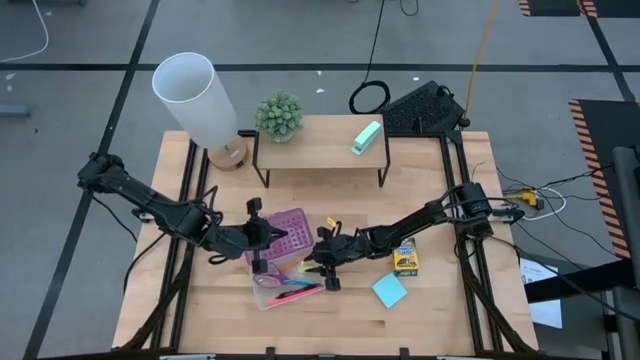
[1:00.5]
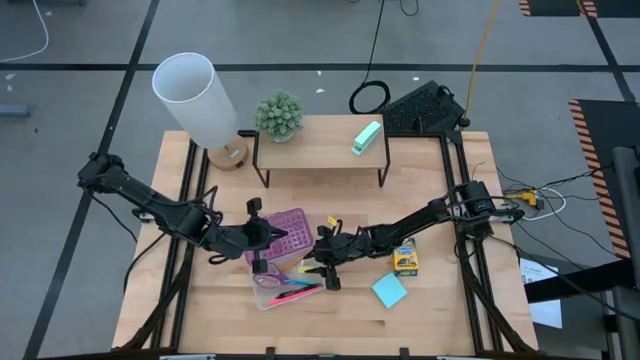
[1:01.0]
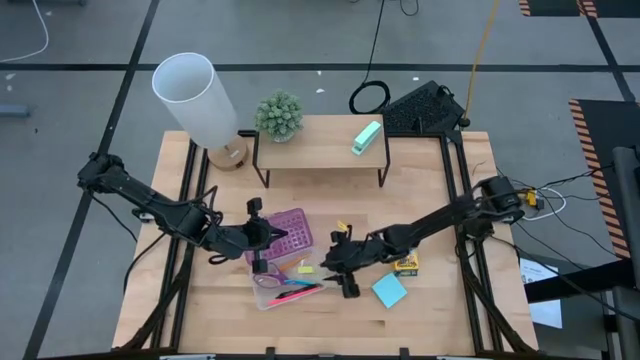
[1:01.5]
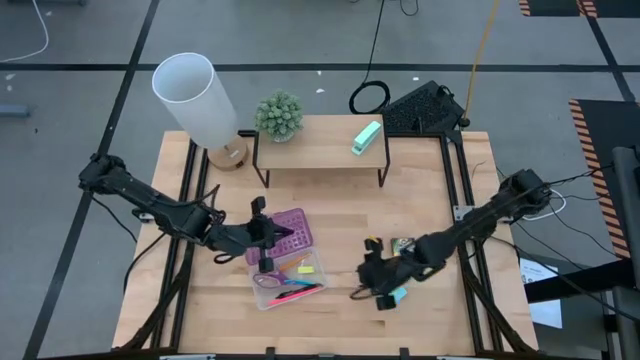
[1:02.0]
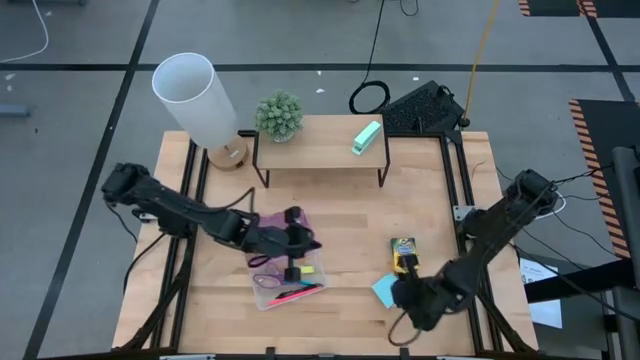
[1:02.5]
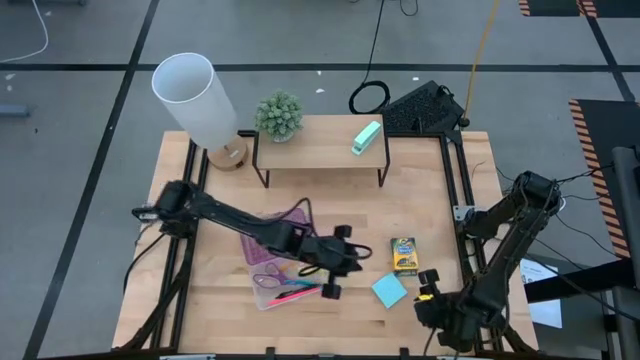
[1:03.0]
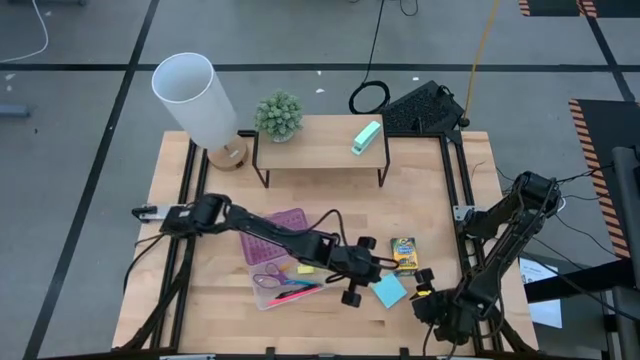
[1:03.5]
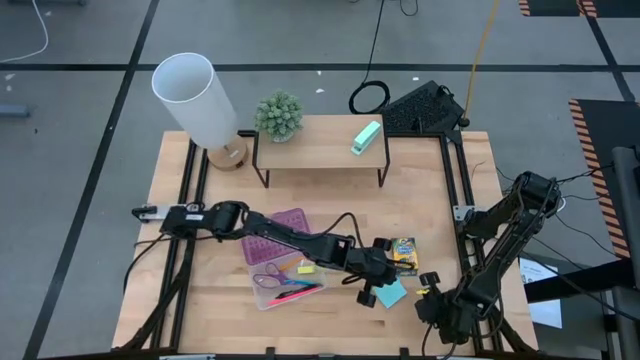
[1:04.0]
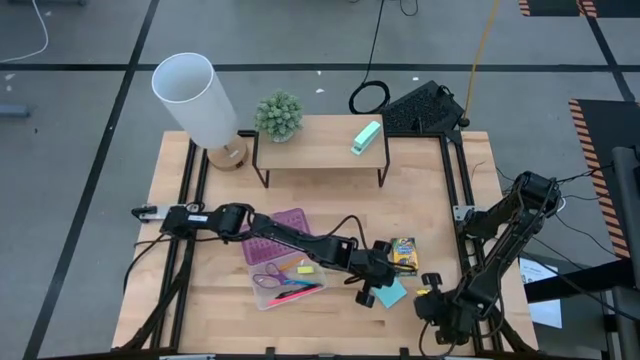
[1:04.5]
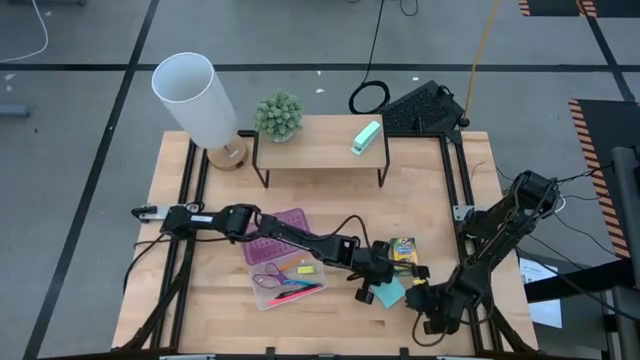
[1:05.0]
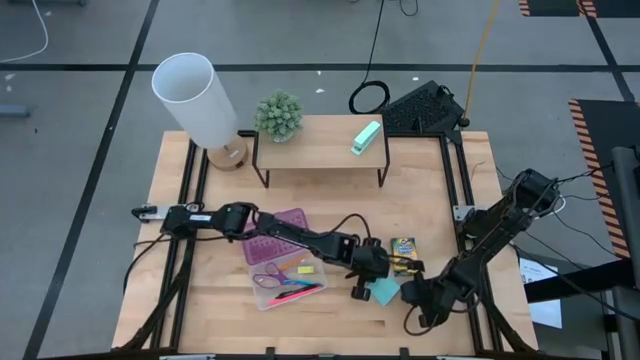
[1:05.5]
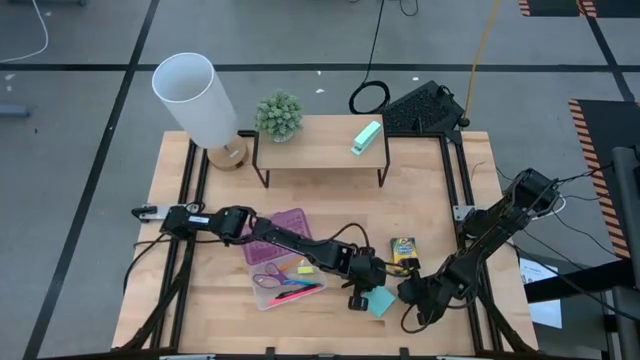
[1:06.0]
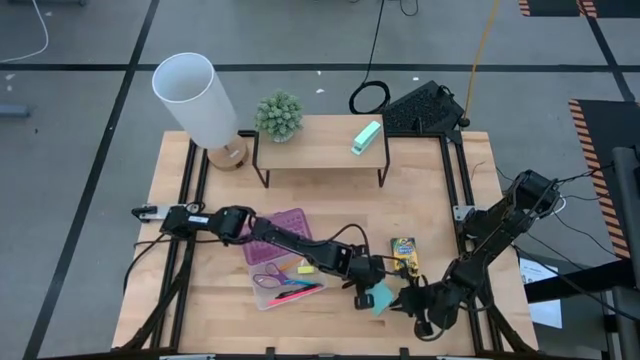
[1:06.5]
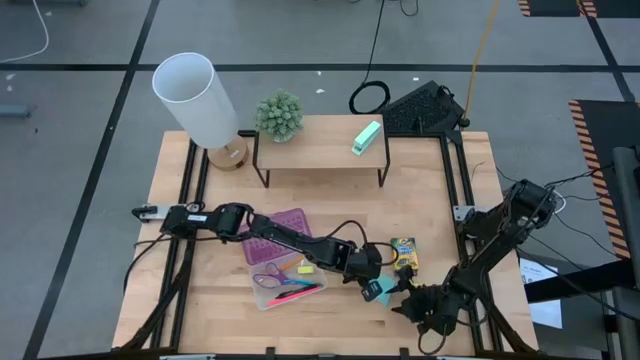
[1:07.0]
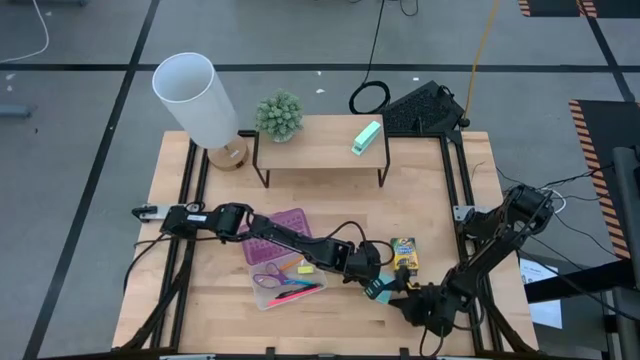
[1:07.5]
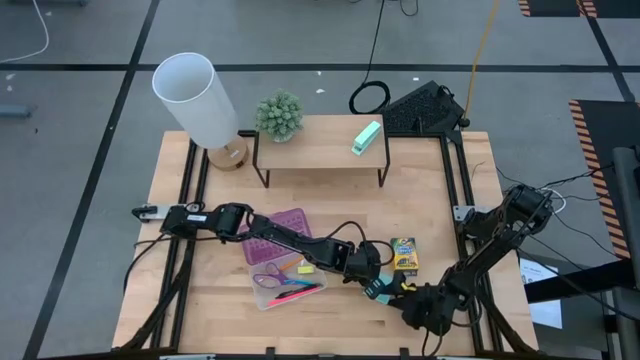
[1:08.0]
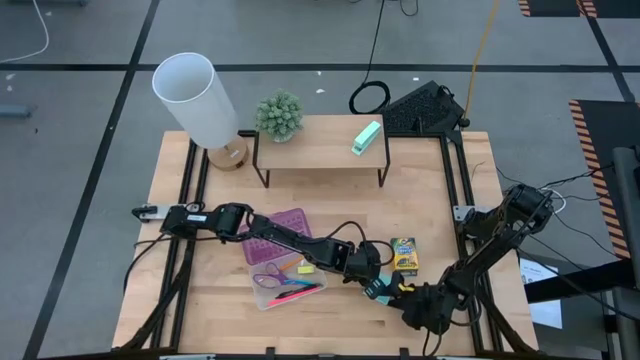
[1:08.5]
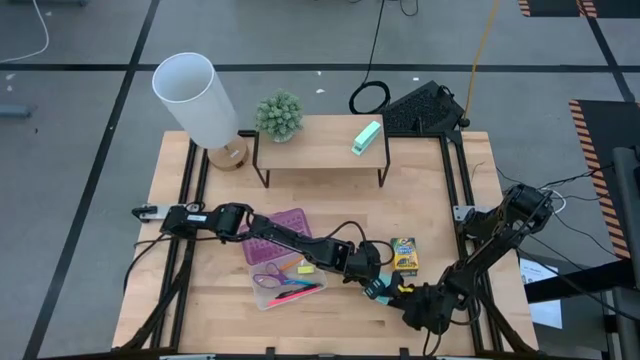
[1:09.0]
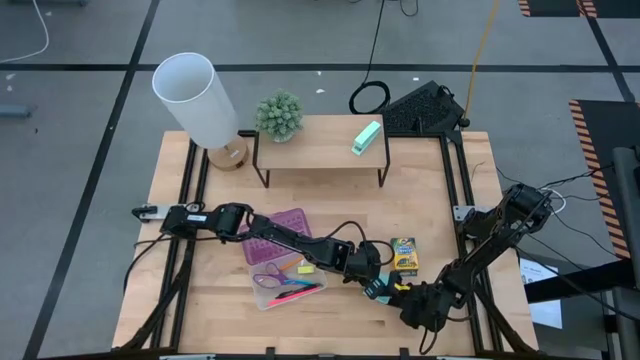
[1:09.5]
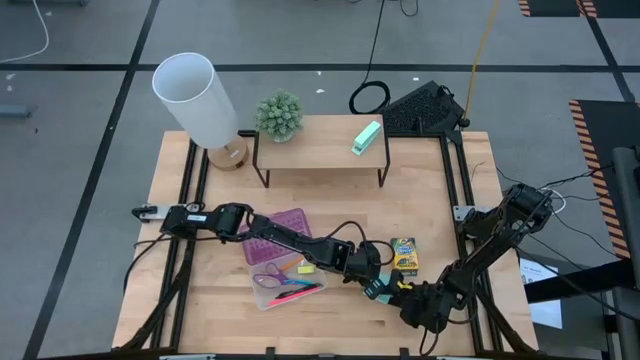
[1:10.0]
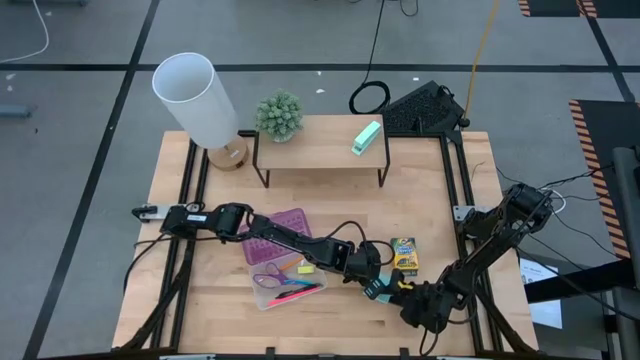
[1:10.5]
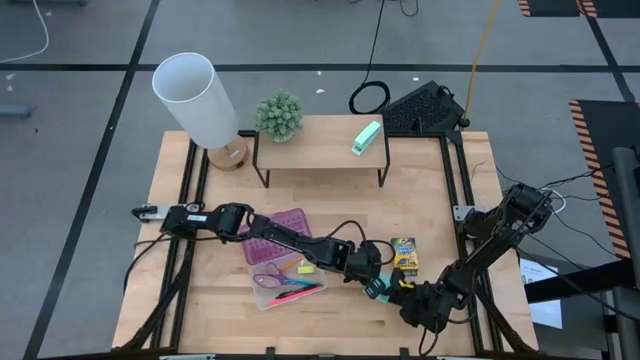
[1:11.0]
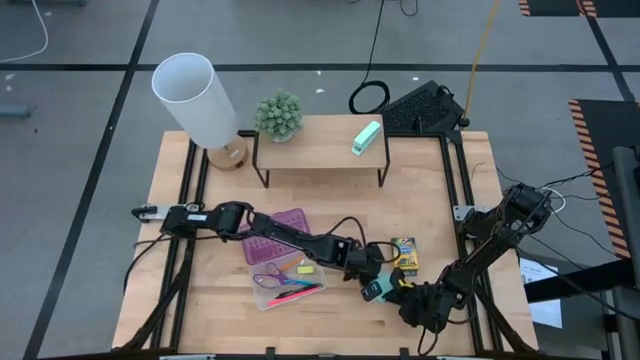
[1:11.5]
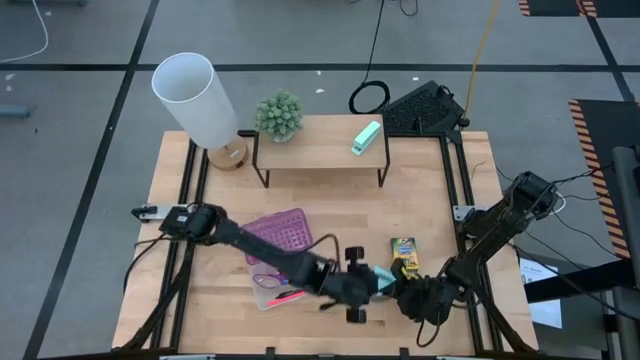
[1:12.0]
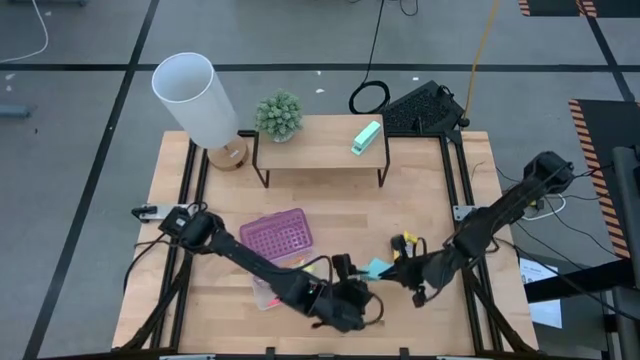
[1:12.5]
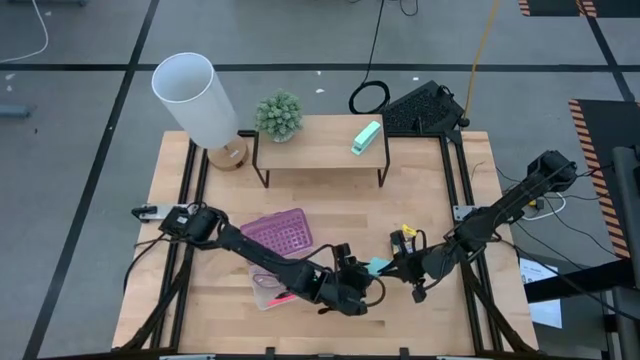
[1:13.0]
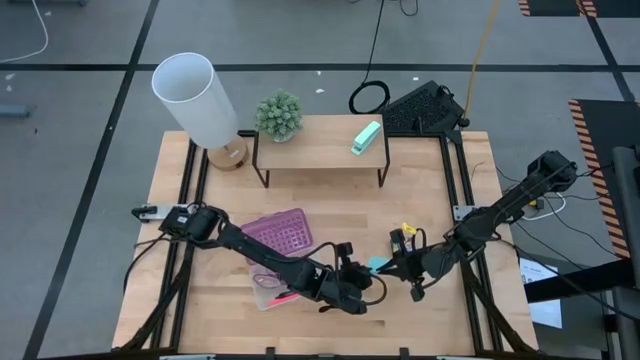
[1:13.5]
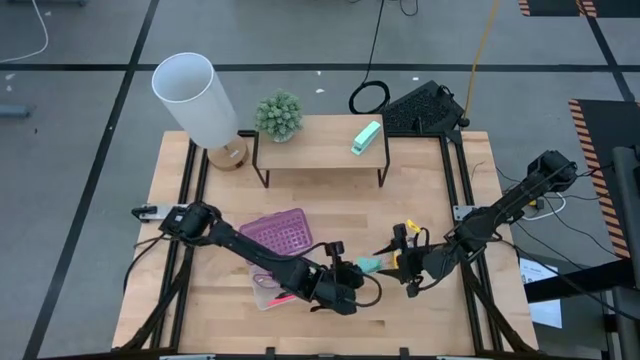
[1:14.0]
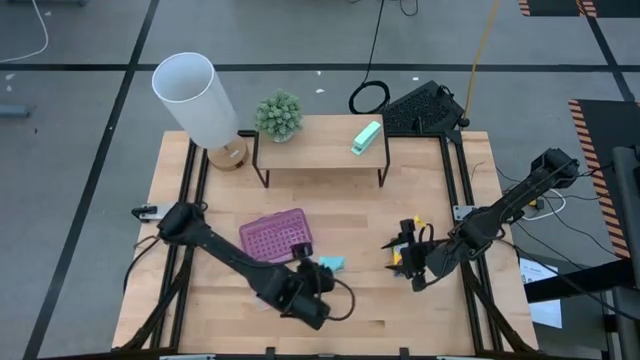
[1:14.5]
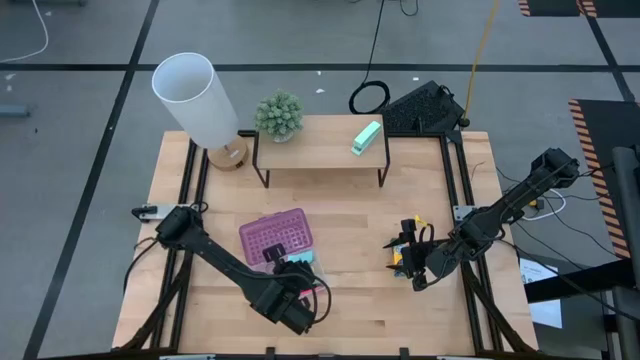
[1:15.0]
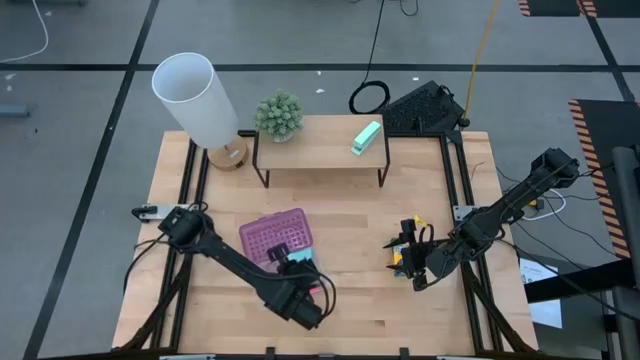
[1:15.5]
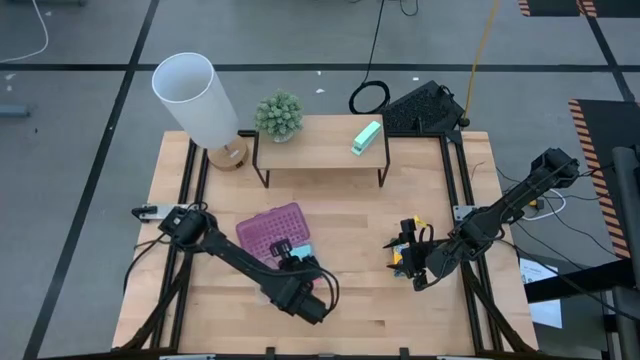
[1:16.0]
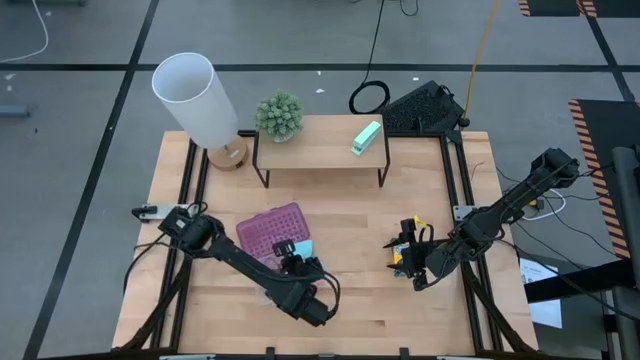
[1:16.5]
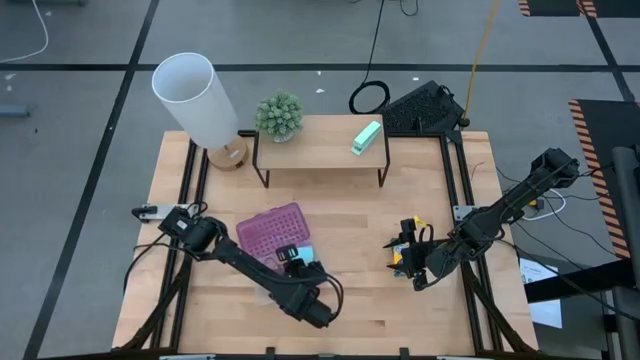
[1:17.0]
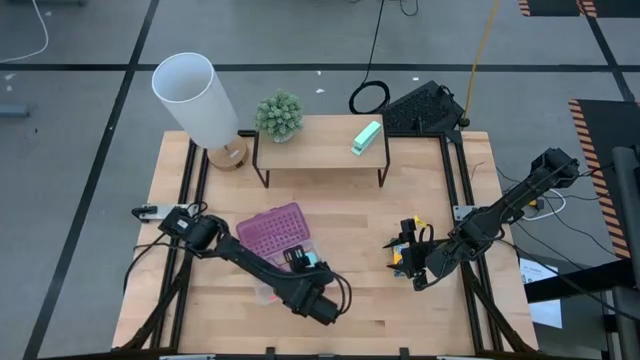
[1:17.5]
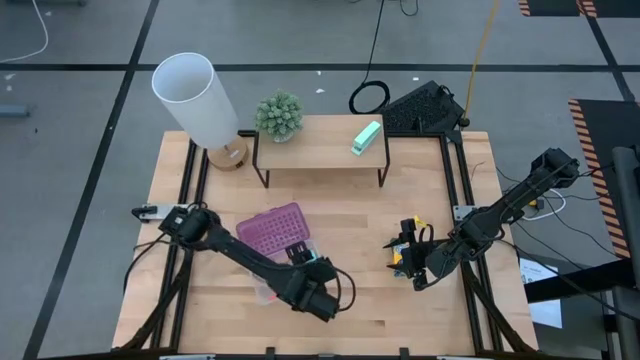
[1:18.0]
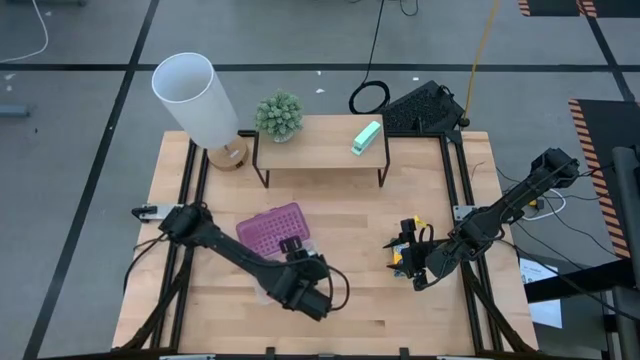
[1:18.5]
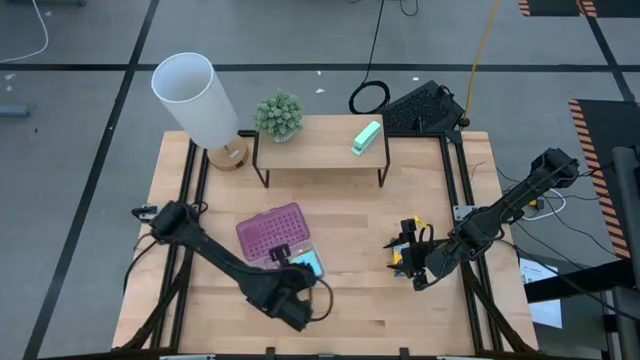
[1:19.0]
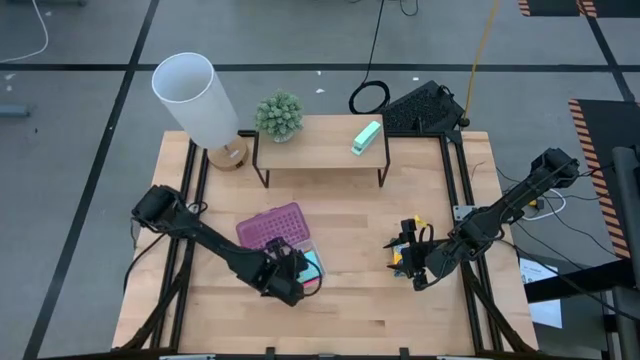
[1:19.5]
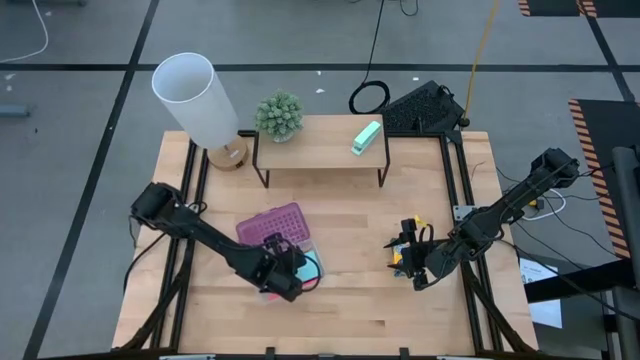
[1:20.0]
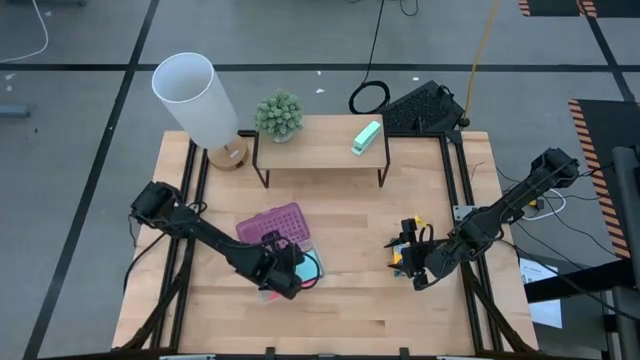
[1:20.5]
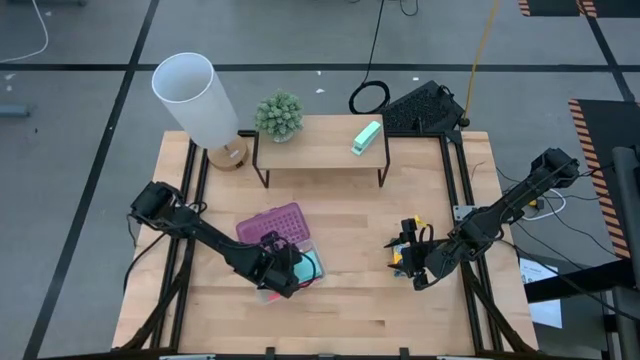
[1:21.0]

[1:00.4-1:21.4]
Task: Pack school essentials
Put the blue notes into the transparent box

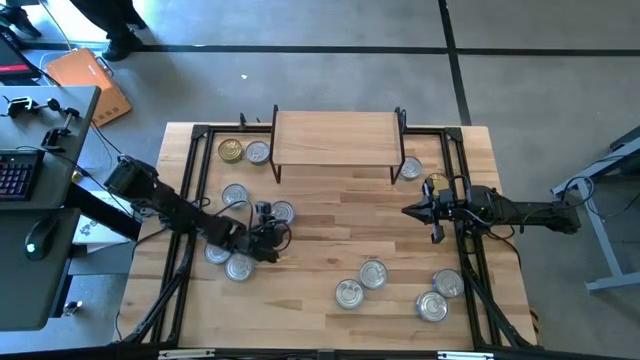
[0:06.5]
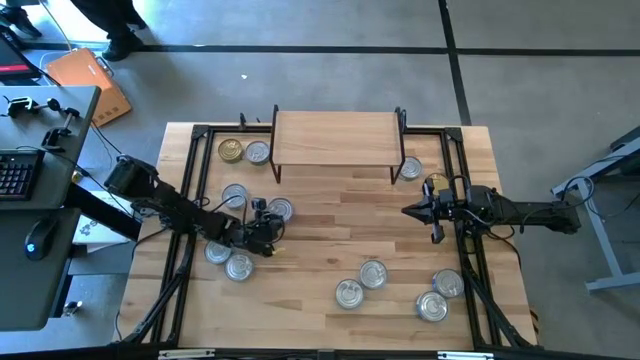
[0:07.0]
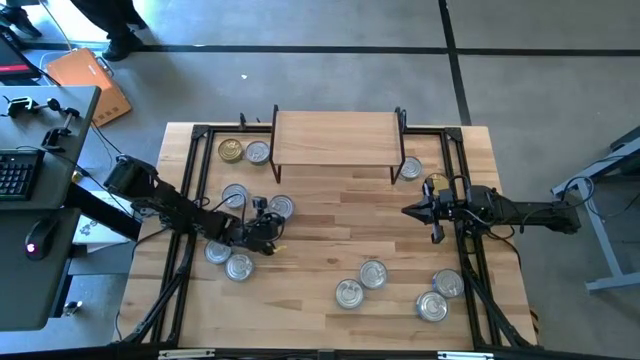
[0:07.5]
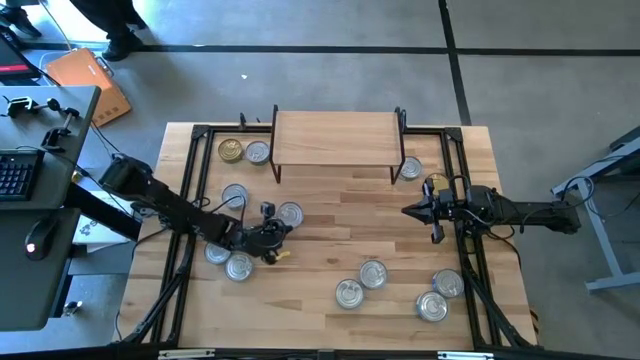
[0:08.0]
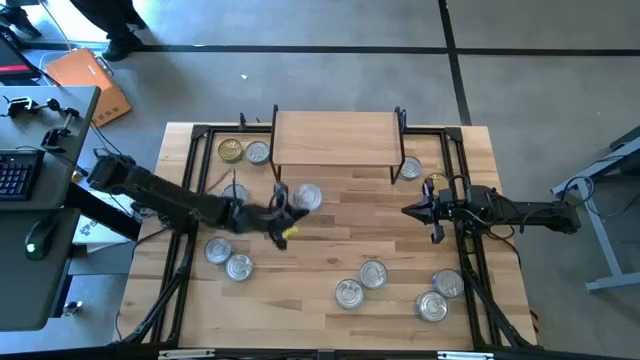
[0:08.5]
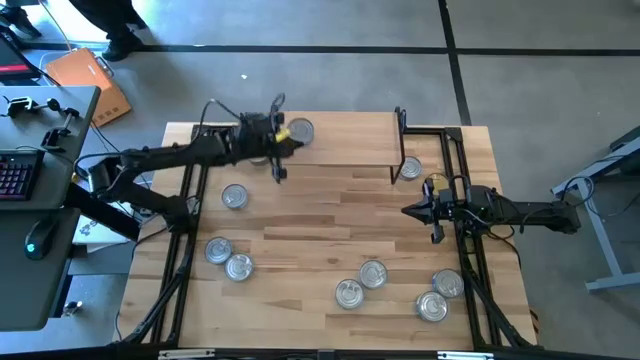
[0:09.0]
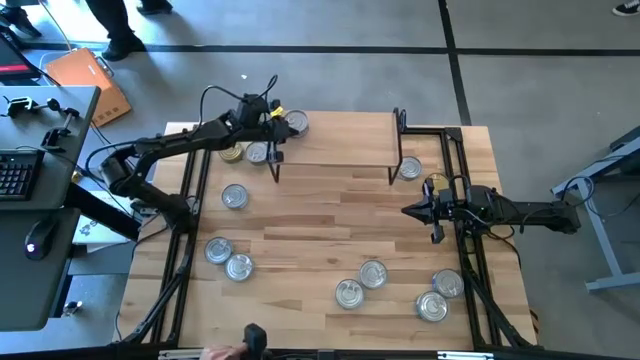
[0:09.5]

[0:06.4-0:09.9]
Task: Stack canned seafood by type on shelf
Put the blue tuna can on the shelf
